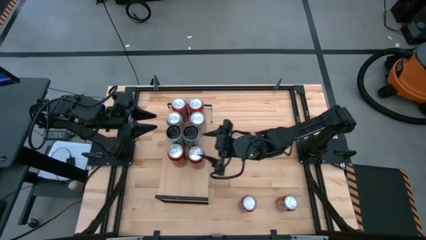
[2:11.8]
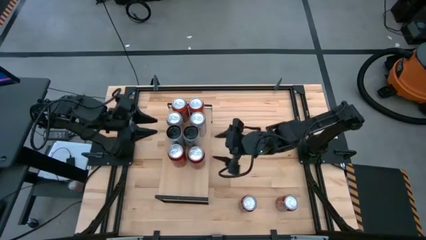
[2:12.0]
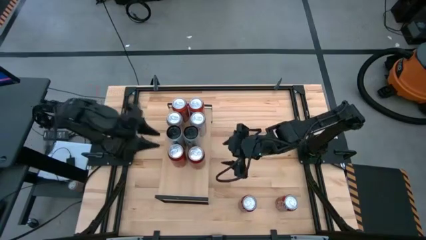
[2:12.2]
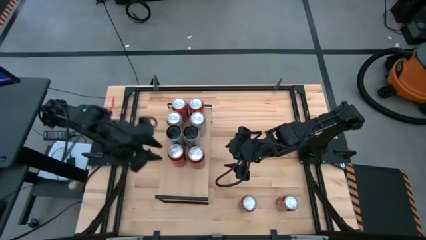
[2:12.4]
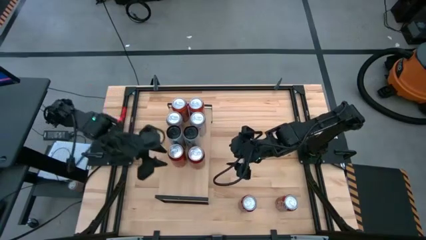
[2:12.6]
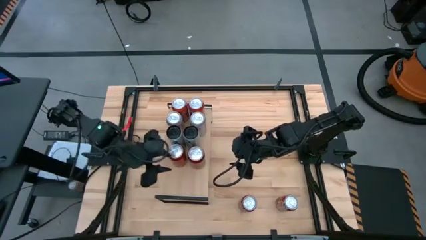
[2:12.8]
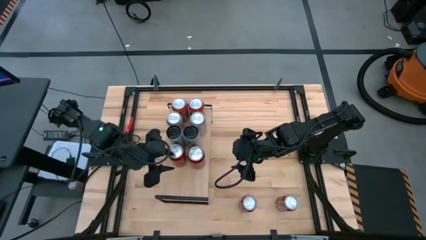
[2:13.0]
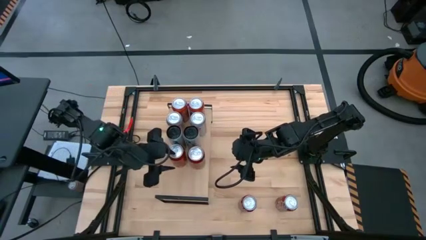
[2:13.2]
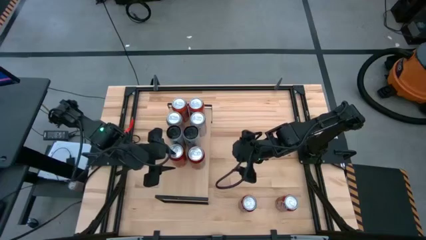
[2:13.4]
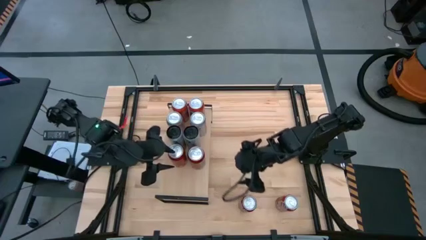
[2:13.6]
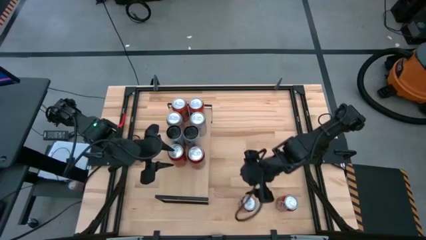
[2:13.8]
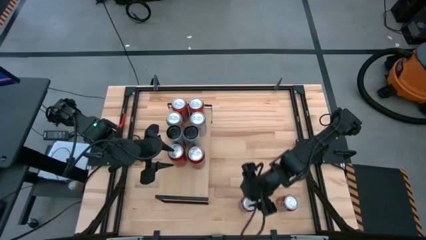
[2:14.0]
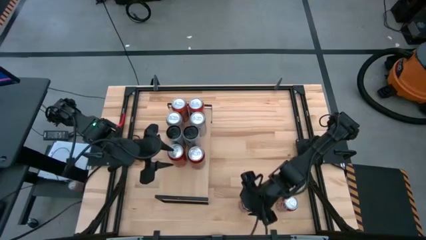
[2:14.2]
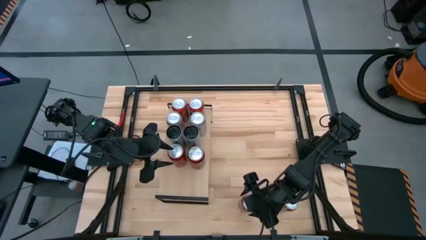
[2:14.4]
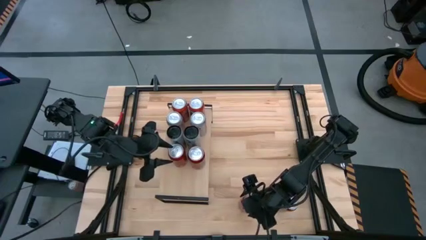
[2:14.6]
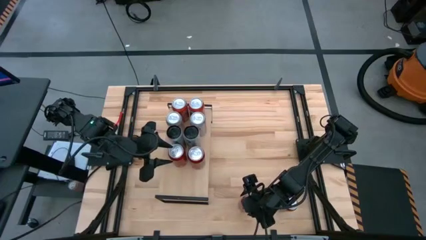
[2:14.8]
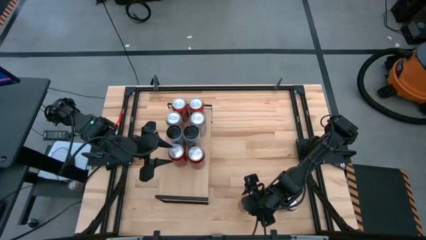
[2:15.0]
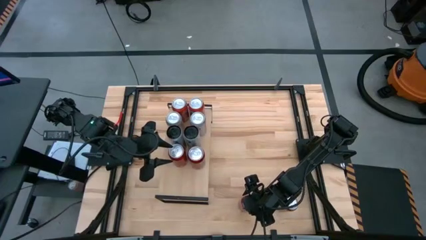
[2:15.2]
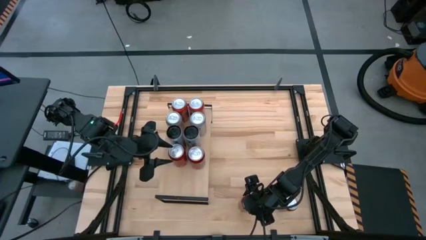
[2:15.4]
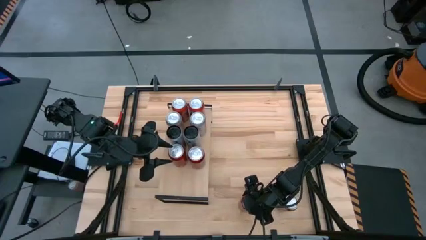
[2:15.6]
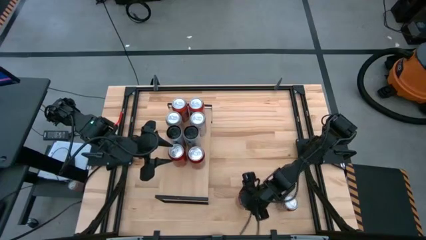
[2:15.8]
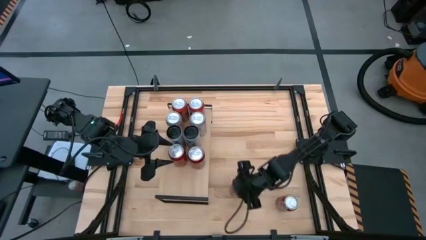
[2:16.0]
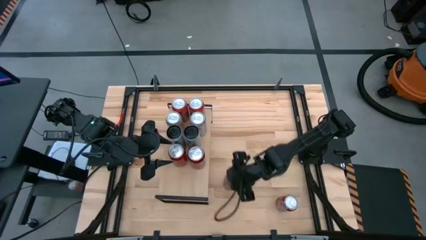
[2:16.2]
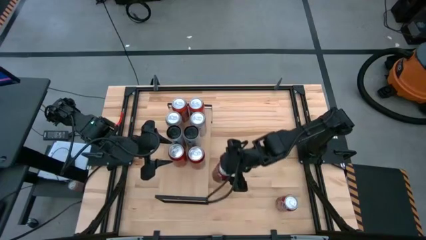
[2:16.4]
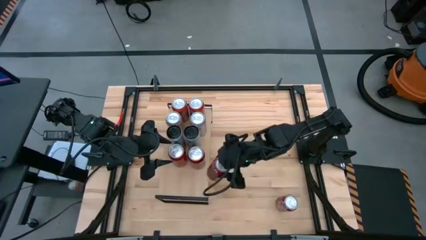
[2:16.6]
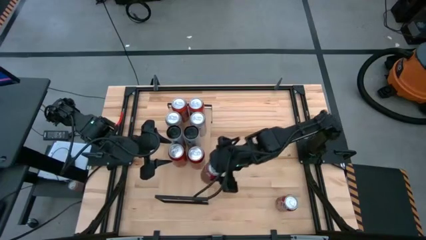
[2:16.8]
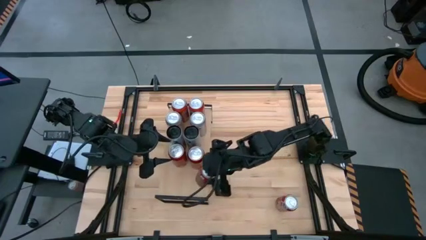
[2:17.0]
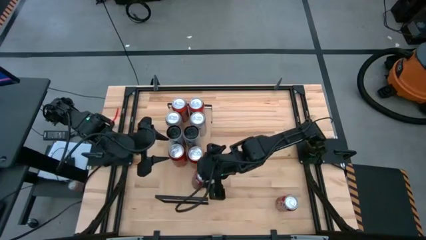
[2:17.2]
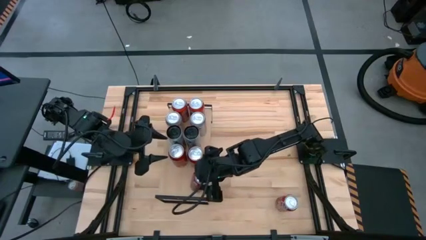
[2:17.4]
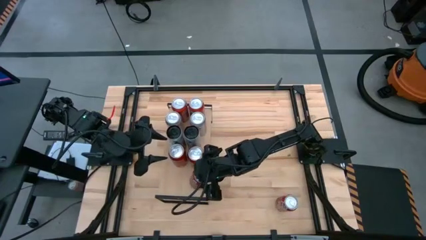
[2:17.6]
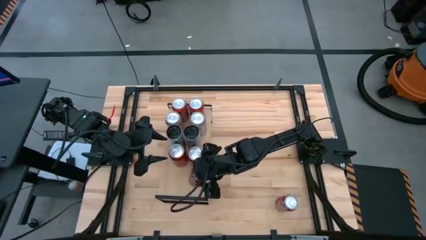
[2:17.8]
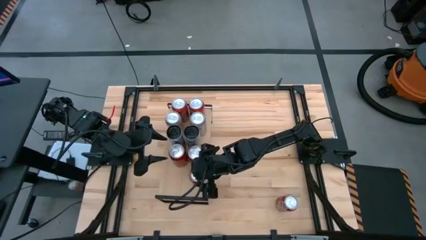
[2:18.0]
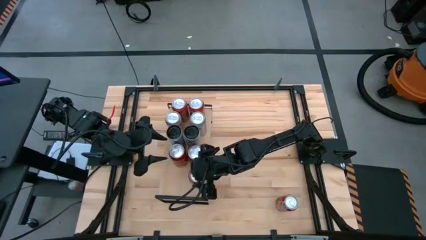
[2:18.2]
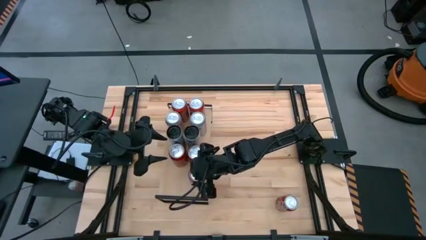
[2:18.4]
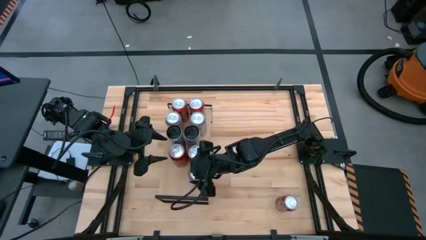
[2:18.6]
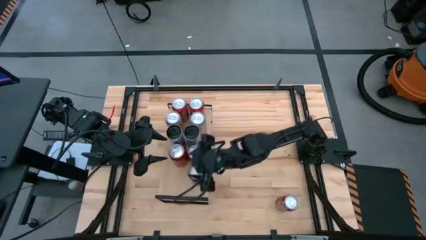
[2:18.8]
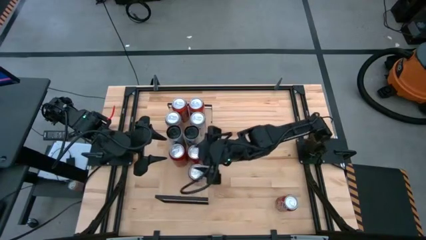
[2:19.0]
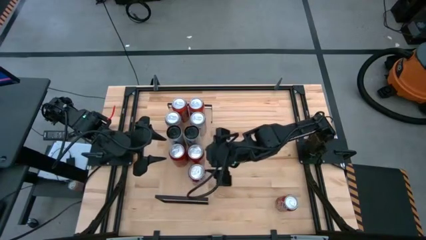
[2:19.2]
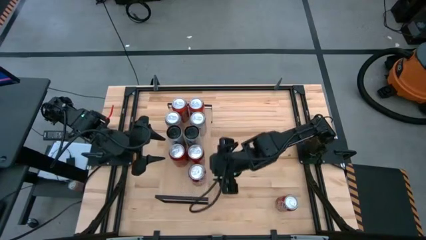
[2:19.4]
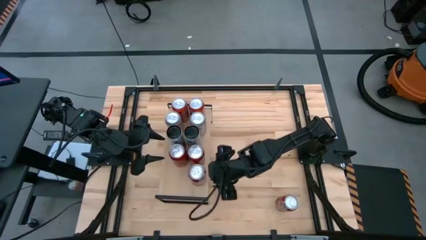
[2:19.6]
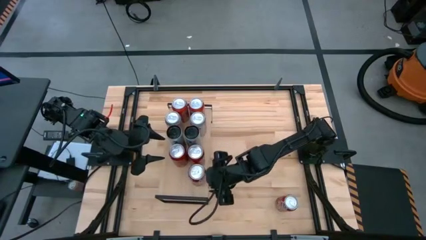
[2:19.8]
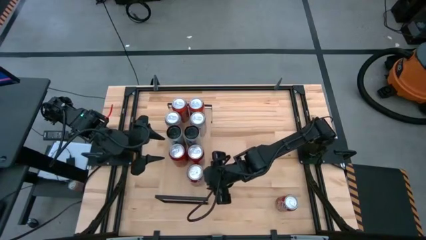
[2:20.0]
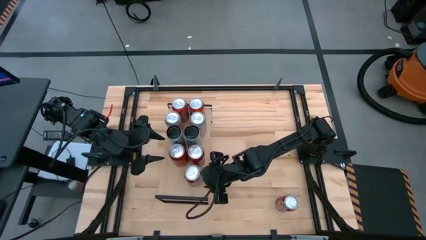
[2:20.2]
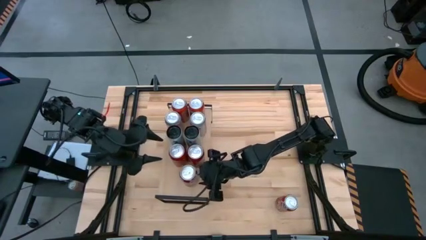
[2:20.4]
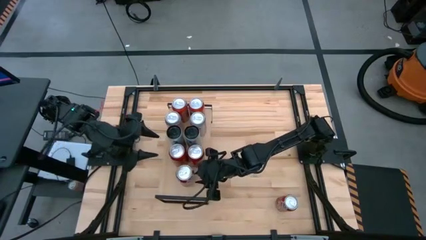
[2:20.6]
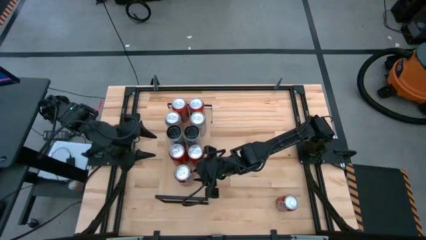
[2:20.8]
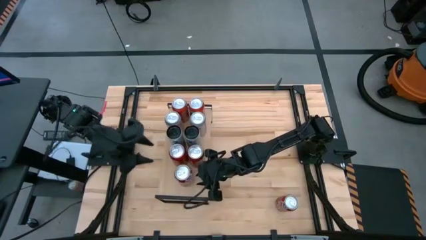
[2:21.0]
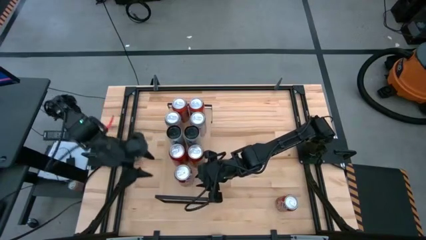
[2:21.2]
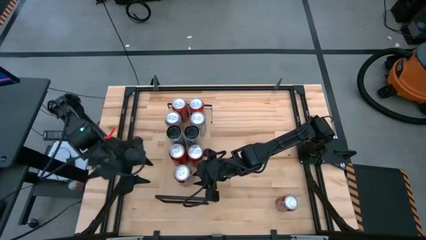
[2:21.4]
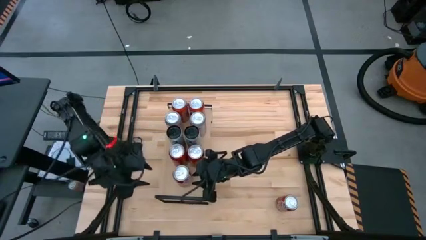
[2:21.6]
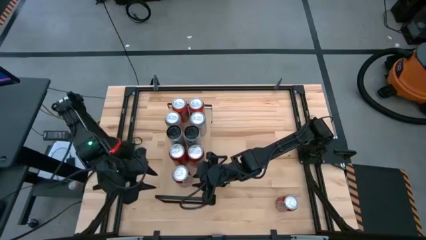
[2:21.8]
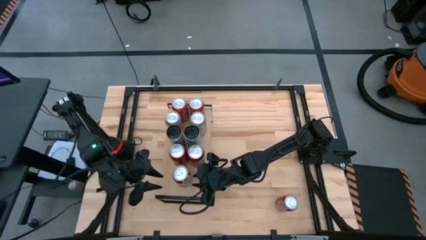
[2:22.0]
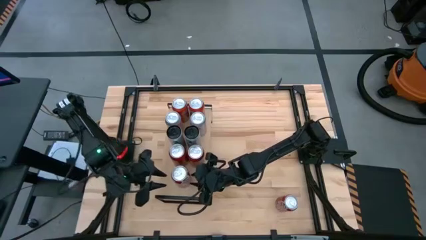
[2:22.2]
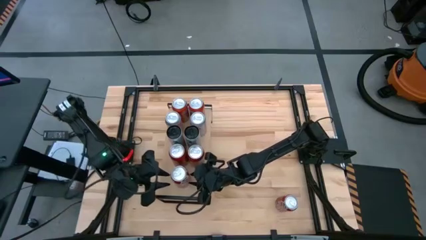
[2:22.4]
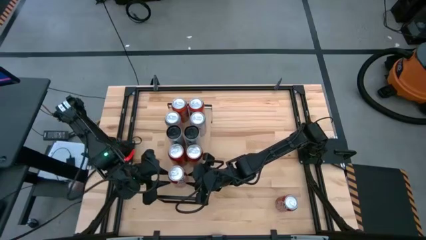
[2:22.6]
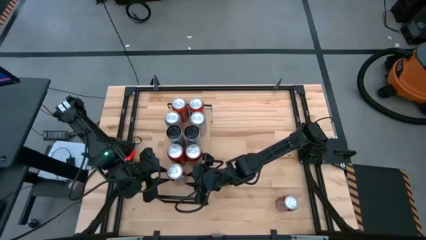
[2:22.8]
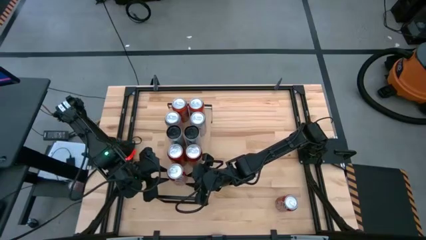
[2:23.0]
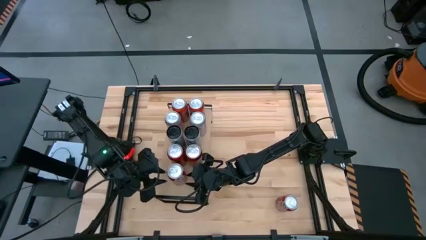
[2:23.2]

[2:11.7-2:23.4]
Task: Pick and place cans onto a shelf
Put the left red-white soda can on the shelf

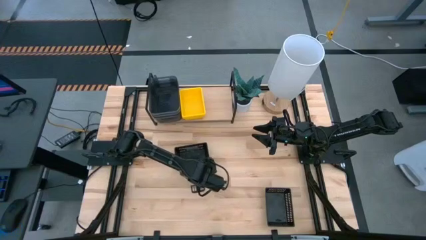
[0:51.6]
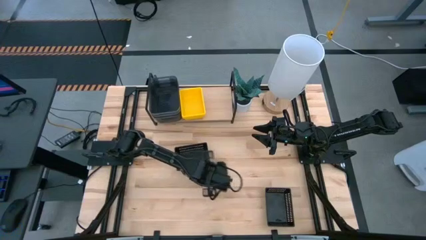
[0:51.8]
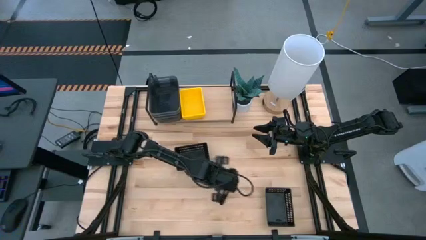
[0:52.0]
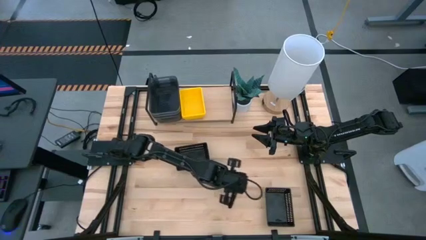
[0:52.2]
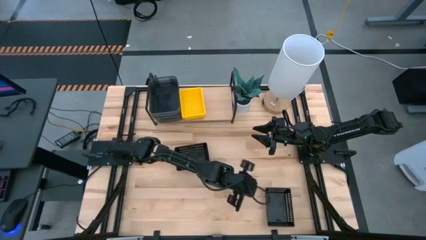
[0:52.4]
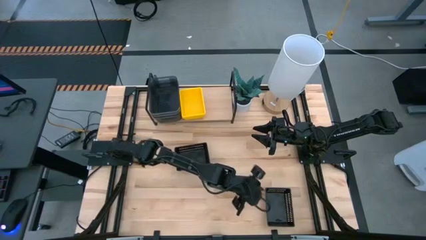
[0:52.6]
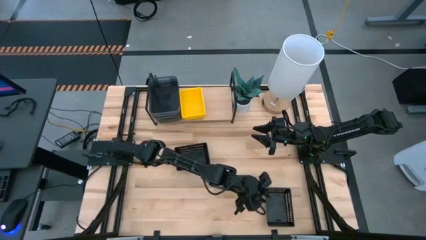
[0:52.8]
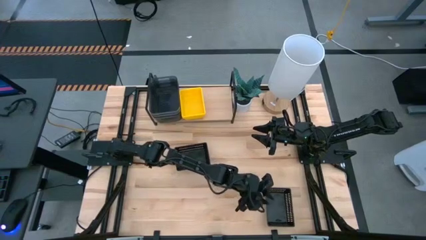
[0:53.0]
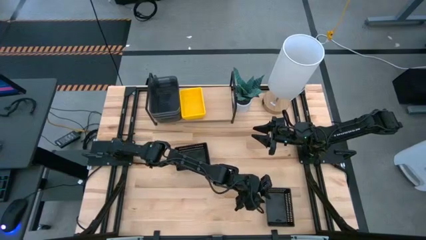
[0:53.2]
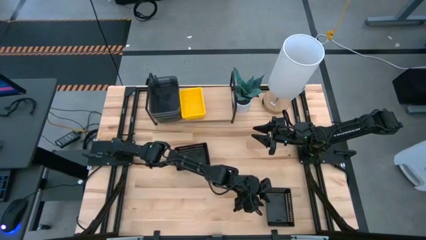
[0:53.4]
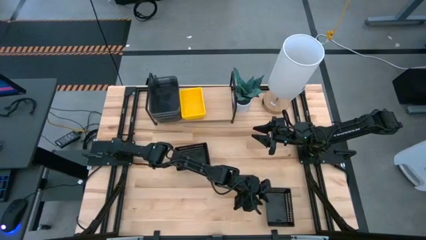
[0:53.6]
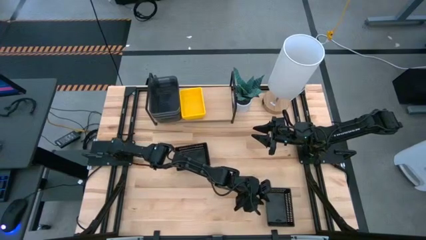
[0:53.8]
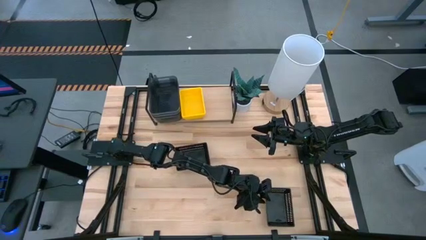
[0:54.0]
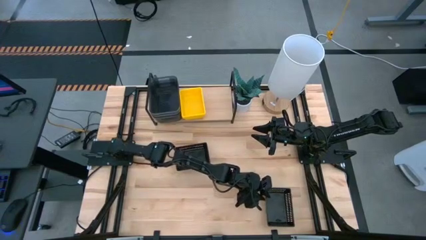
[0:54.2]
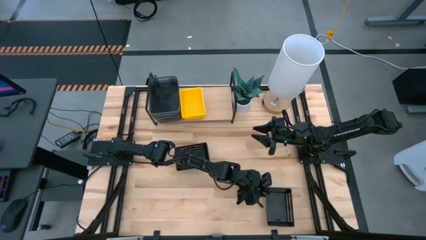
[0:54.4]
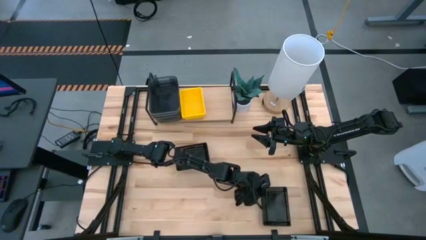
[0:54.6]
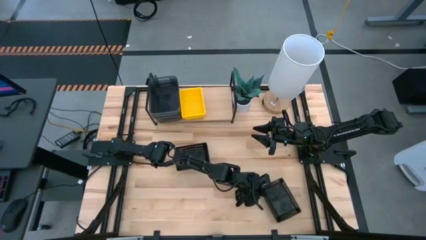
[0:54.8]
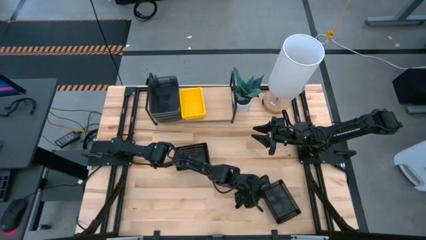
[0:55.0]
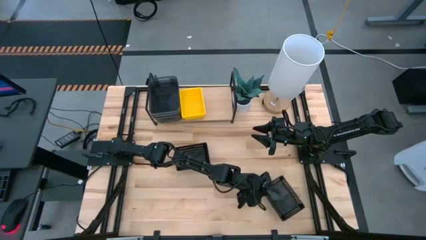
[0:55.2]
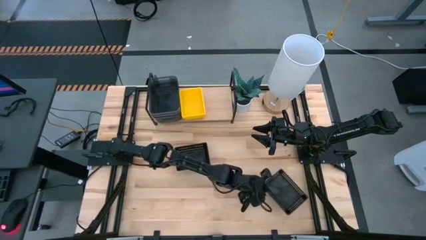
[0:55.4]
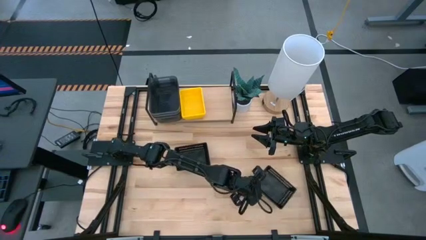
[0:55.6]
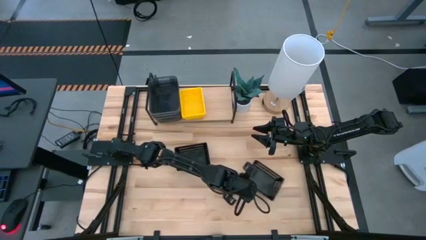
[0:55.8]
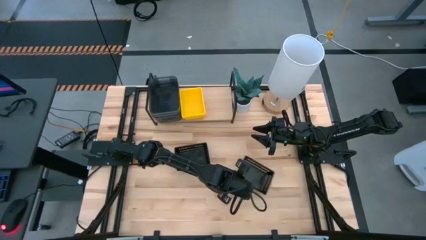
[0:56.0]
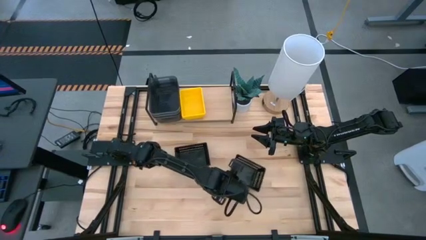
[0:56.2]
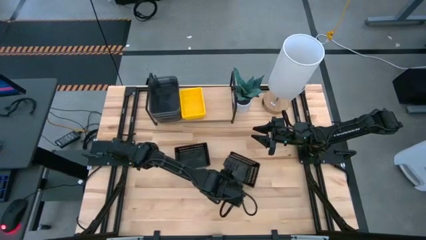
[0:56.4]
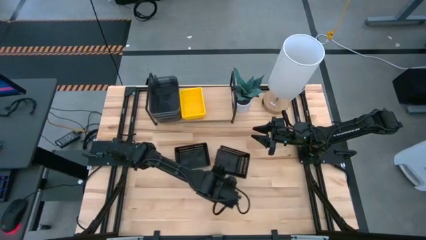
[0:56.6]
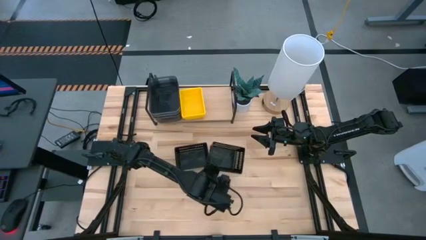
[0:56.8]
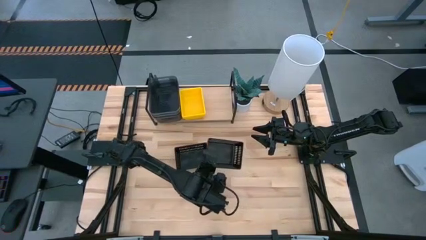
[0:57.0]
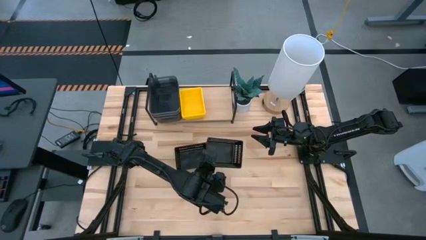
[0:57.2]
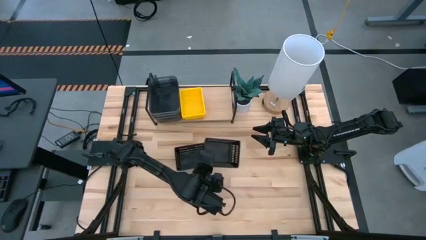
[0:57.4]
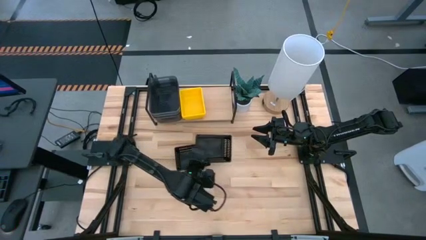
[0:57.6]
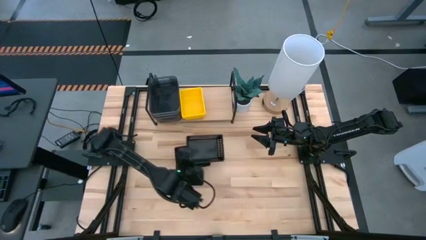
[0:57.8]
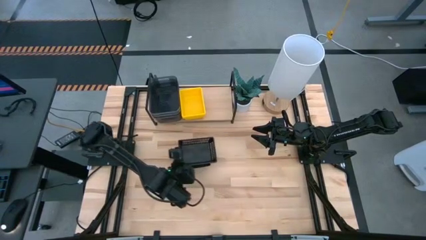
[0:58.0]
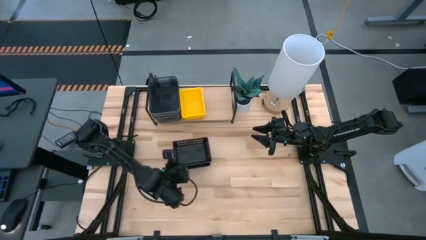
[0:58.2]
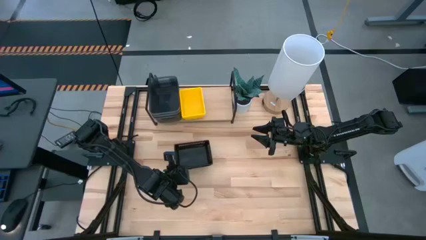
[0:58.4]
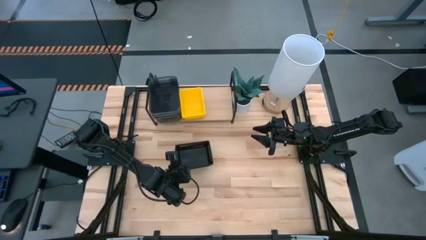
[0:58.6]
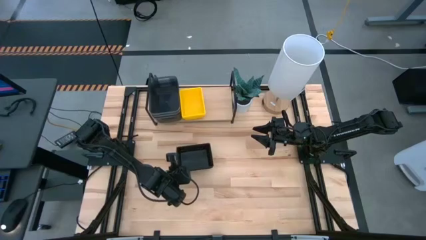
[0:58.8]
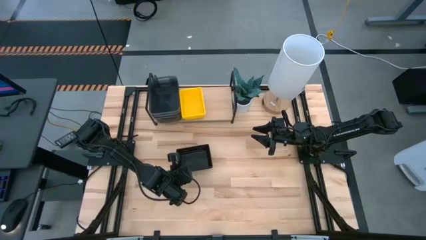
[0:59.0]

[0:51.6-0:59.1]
Task: Stack baskets on shelf by color
Stack the bottom black bin on top of the black stacked bins
